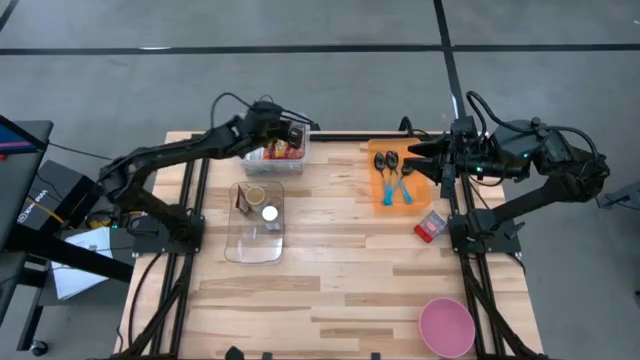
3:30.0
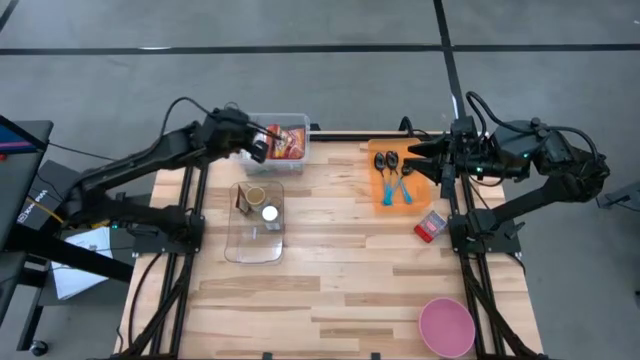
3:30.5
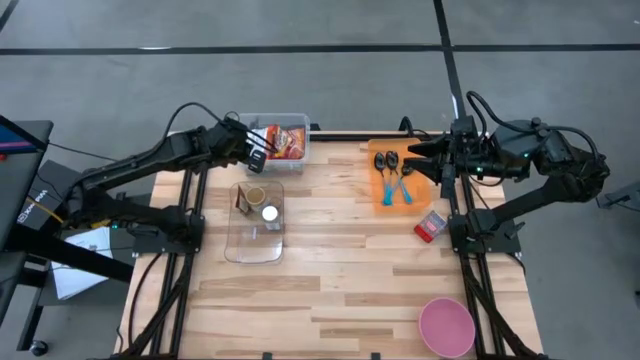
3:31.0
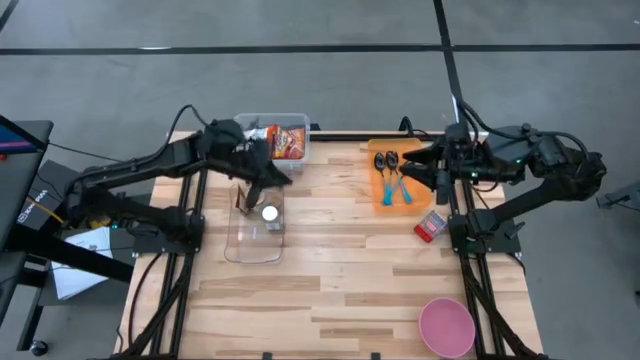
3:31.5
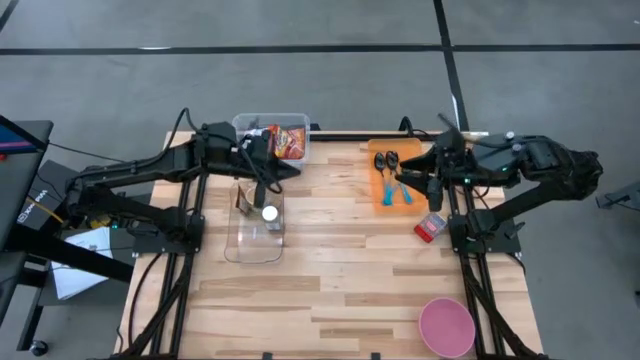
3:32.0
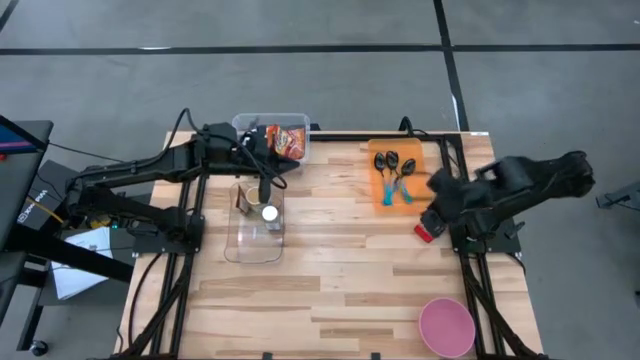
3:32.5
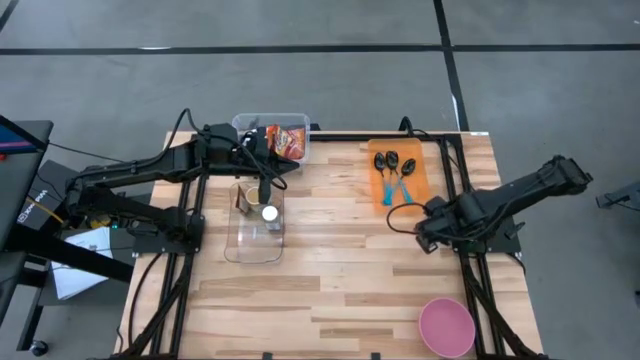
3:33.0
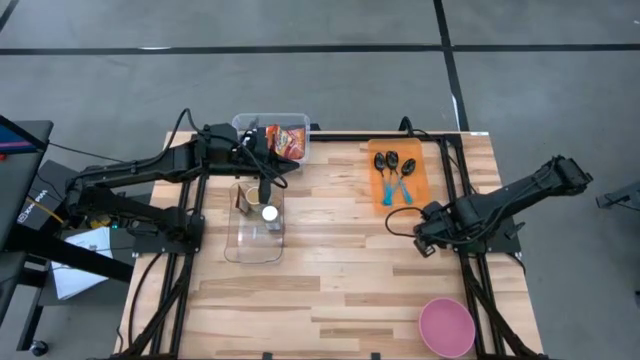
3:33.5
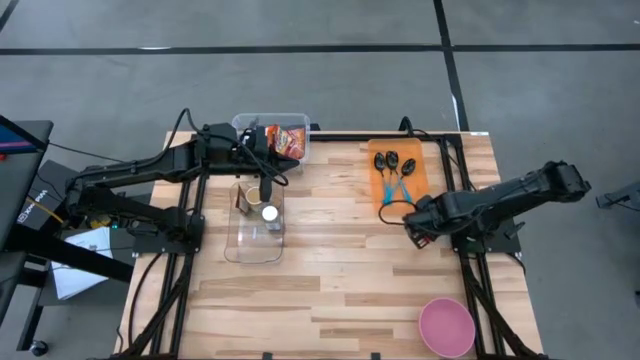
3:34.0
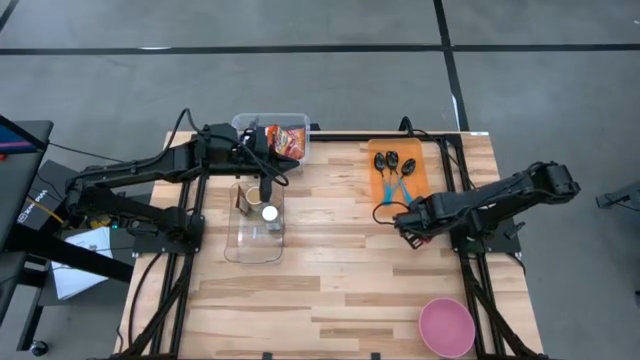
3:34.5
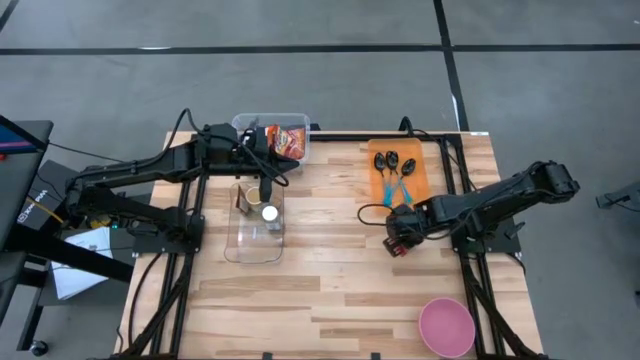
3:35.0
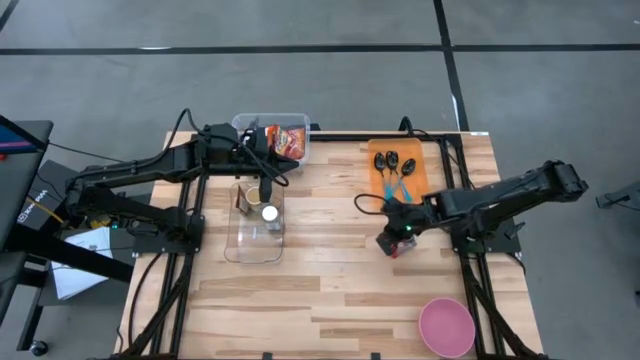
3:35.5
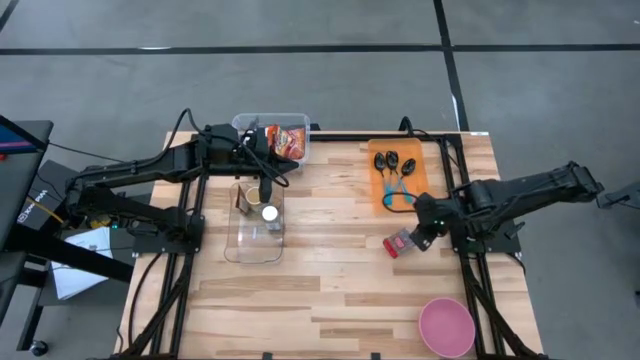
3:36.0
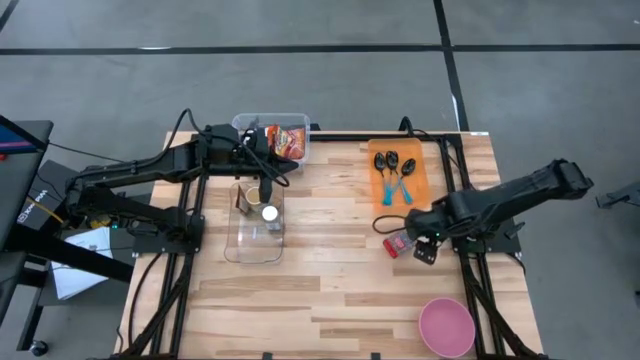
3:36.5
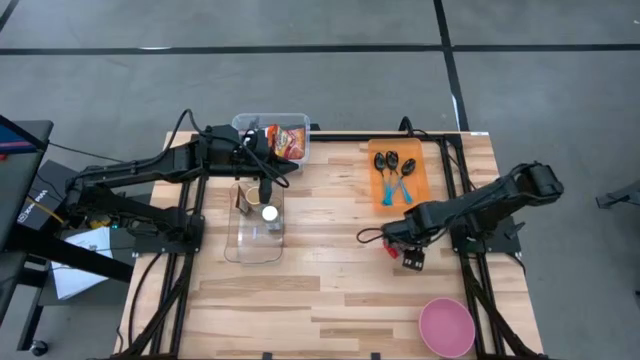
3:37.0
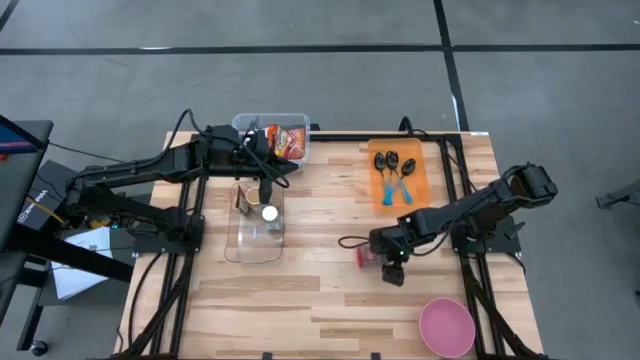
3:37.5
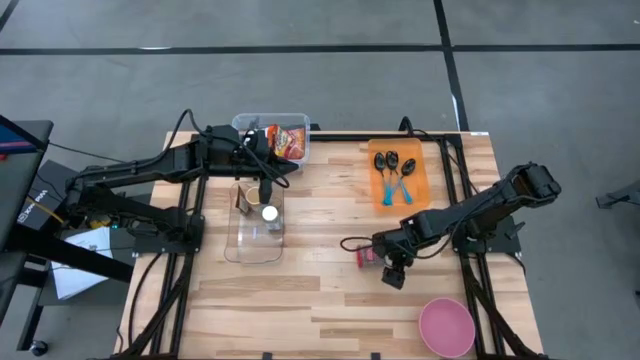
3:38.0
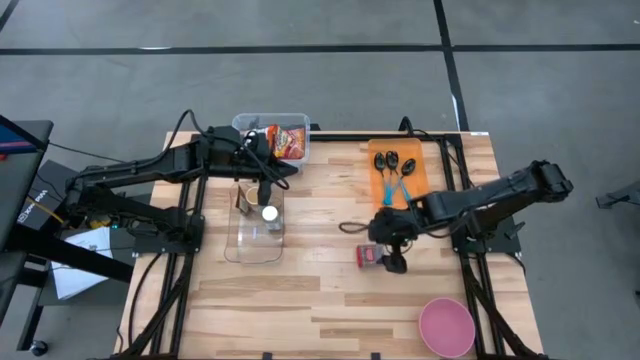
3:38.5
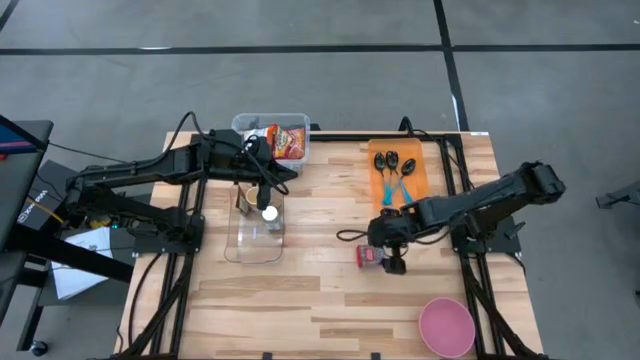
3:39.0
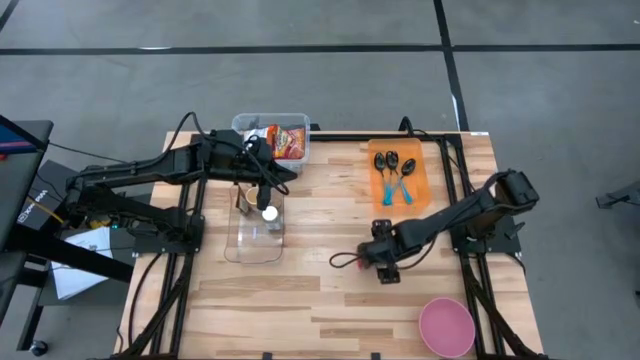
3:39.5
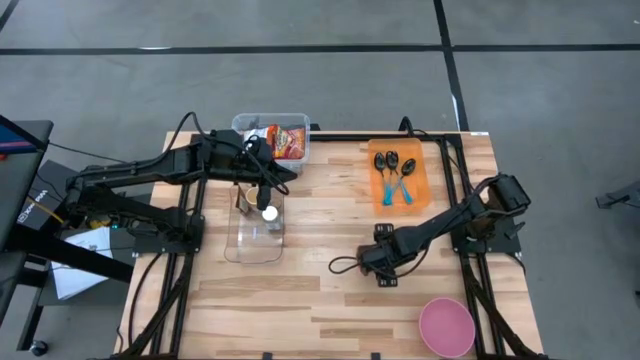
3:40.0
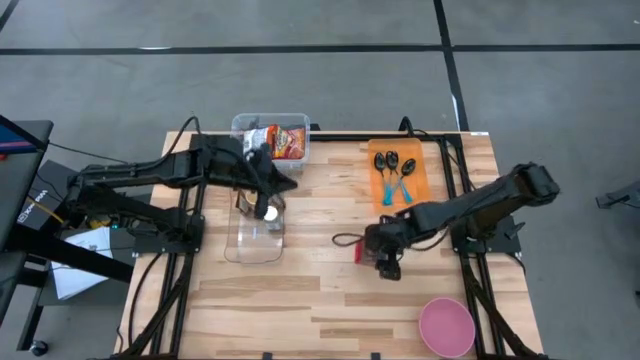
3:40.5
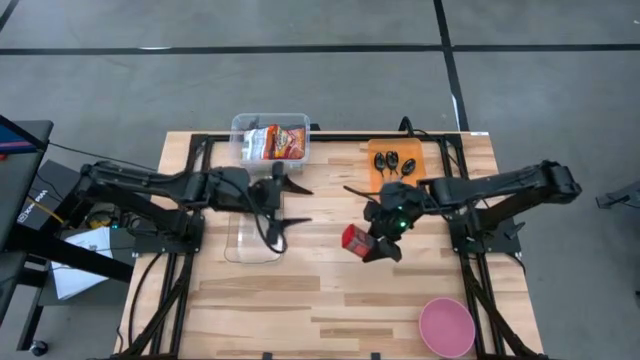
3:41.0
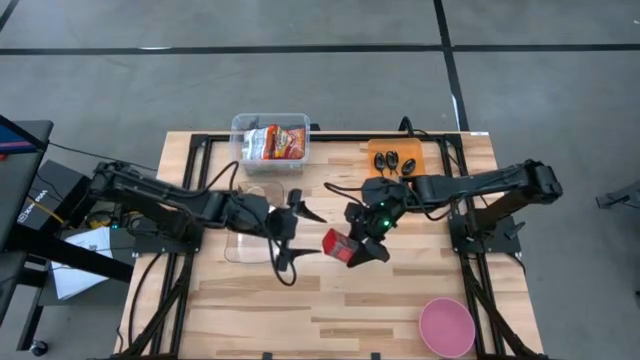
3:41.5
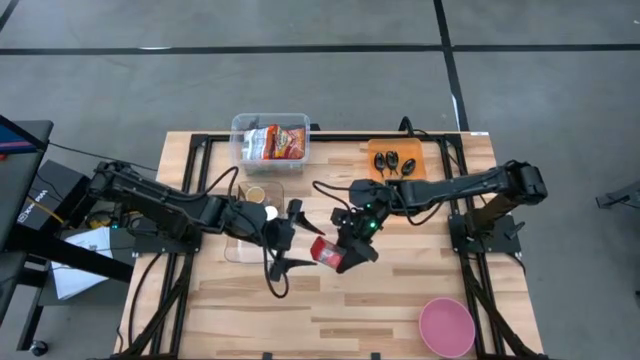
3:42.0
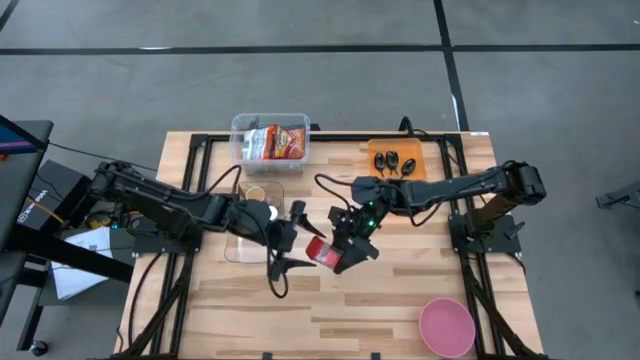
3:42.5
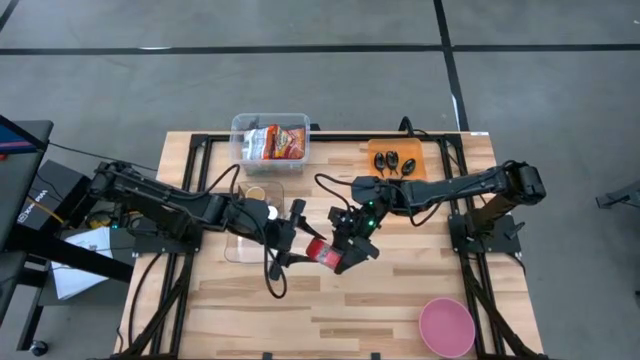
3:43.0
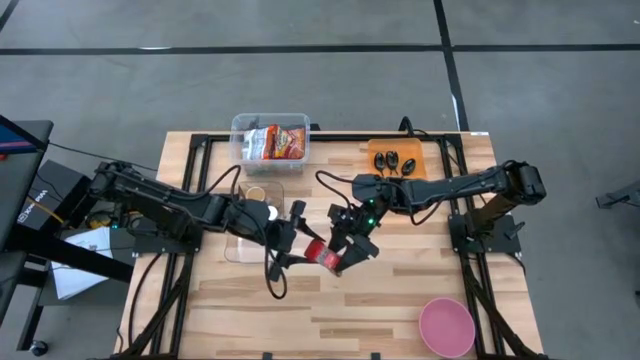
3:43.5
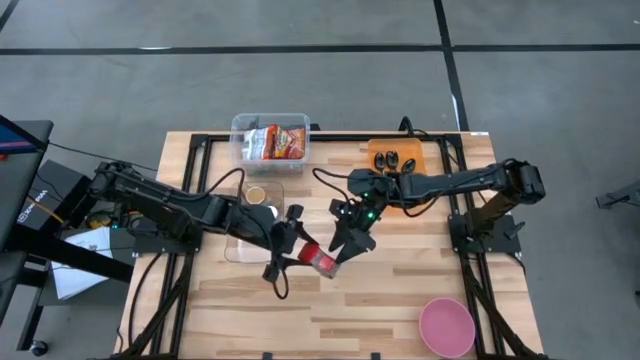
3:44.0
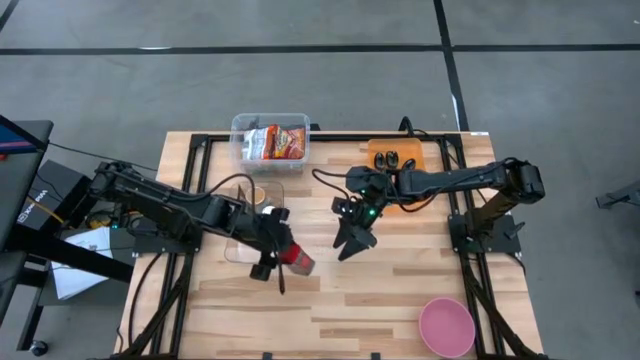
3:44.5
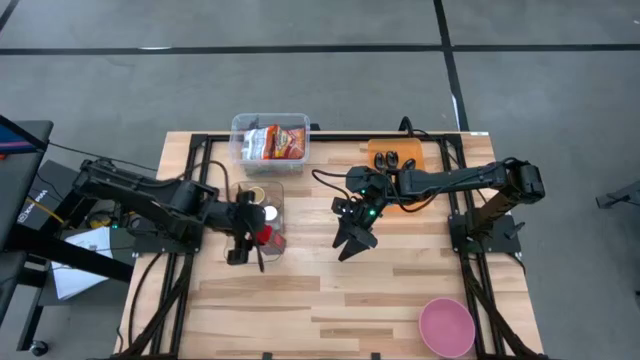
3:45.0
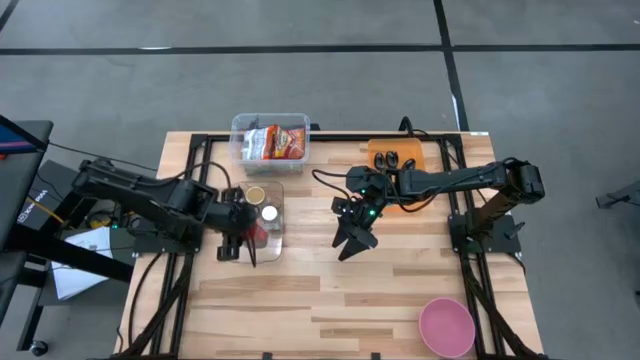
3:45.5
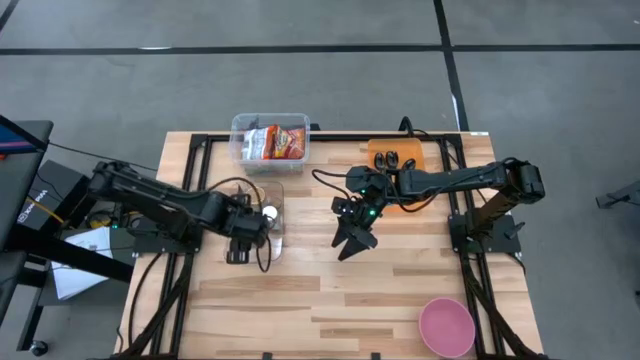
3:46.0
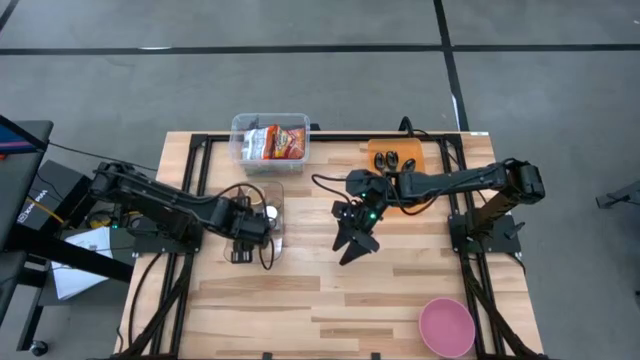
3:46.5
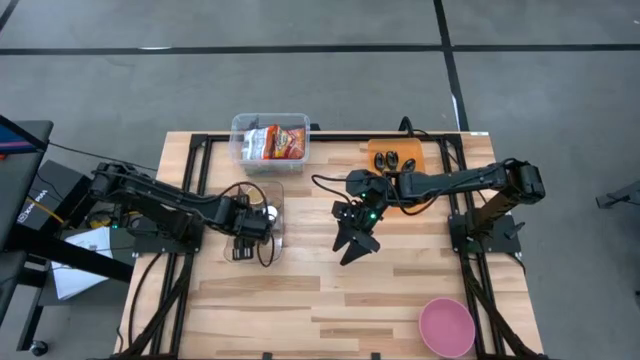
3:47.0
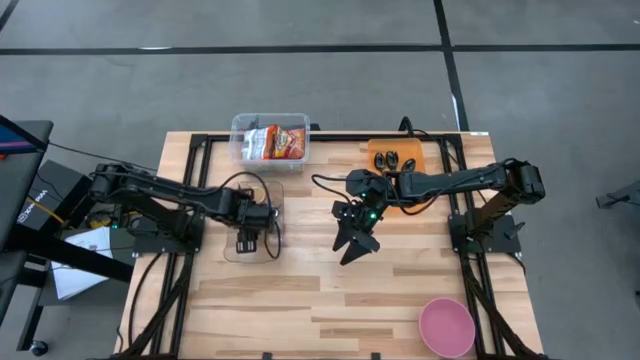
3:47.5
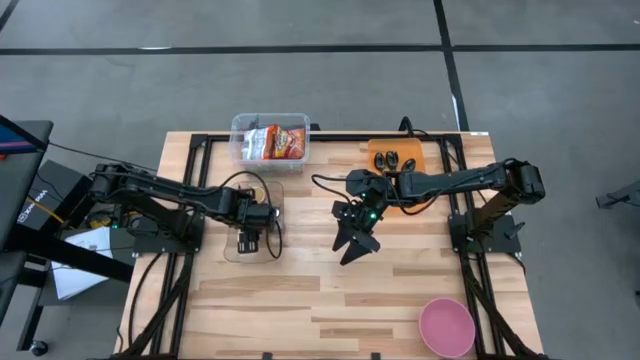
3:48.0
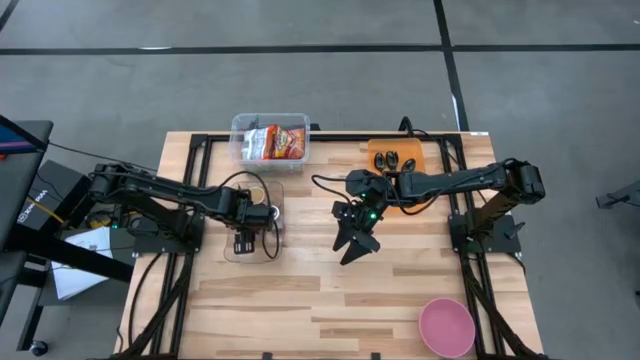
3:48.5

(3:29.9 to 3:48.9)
Task: Pick & Place Food Item
Put the red seasoning can into the transparent bin
